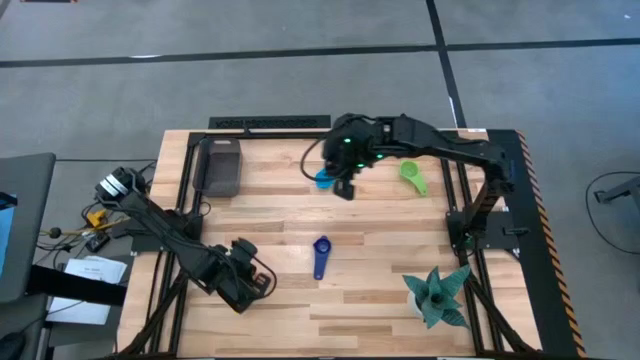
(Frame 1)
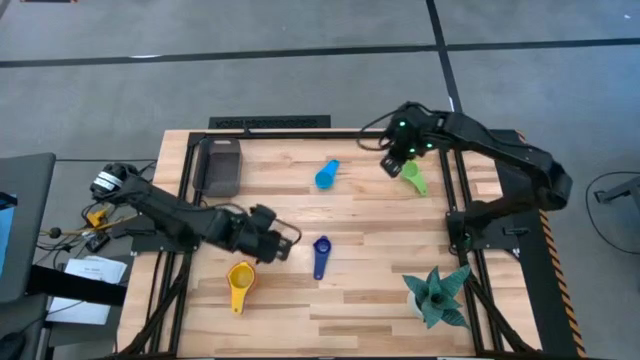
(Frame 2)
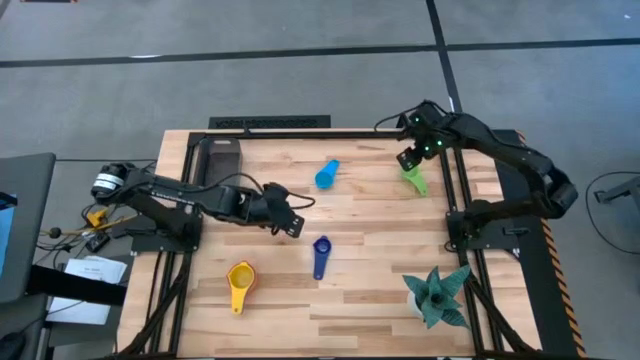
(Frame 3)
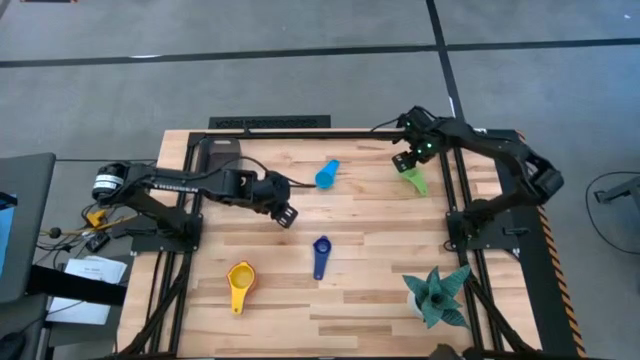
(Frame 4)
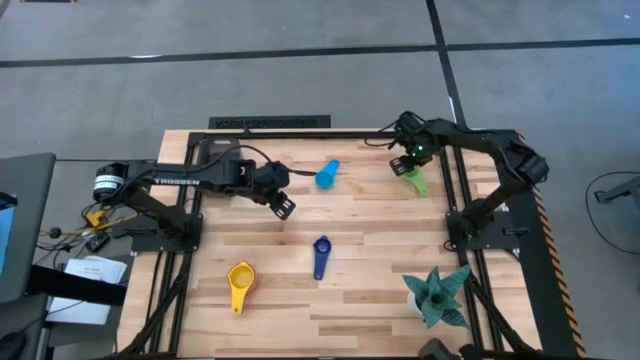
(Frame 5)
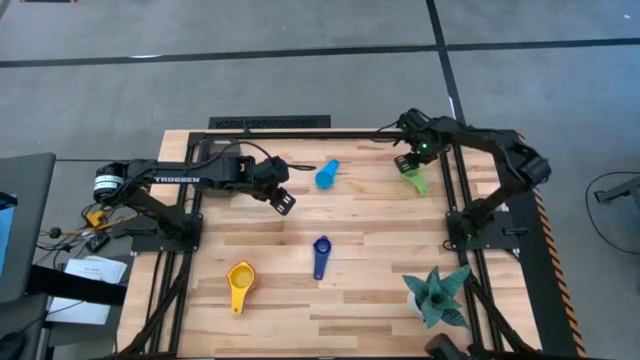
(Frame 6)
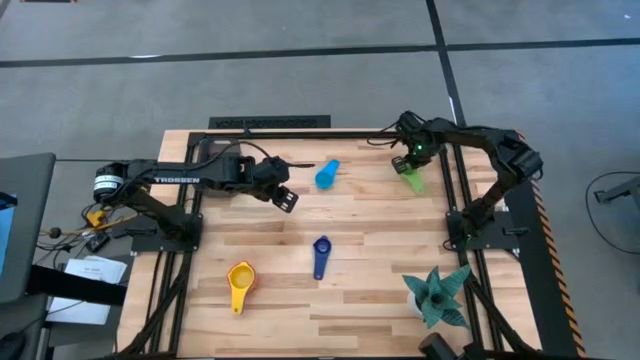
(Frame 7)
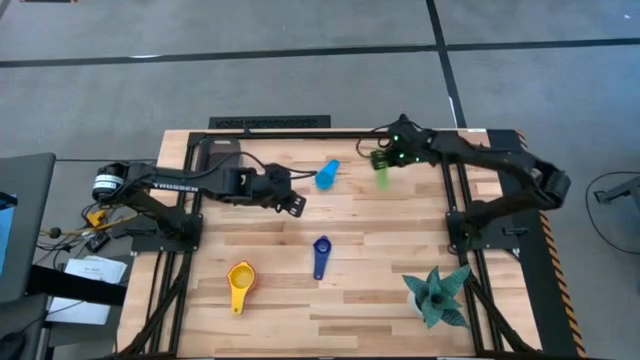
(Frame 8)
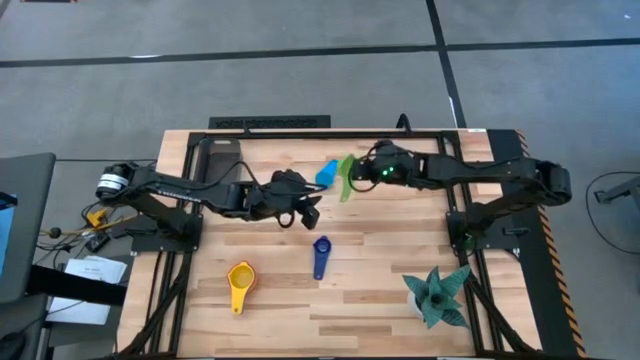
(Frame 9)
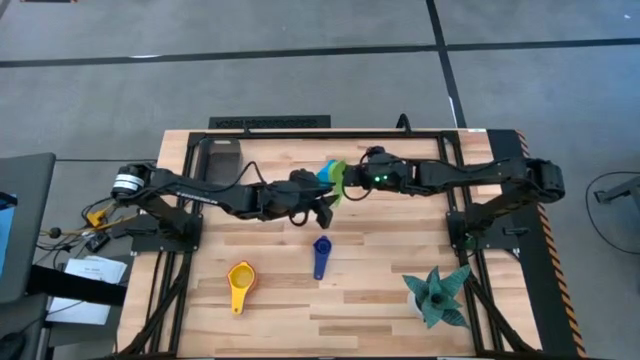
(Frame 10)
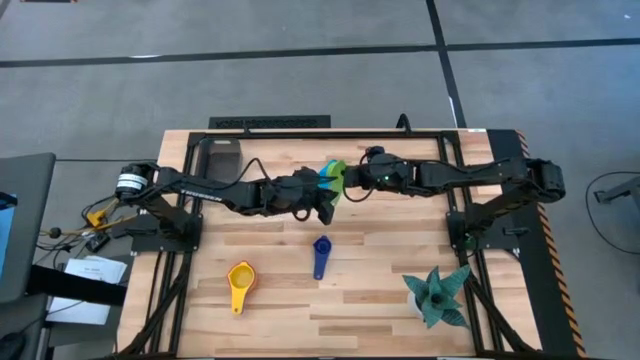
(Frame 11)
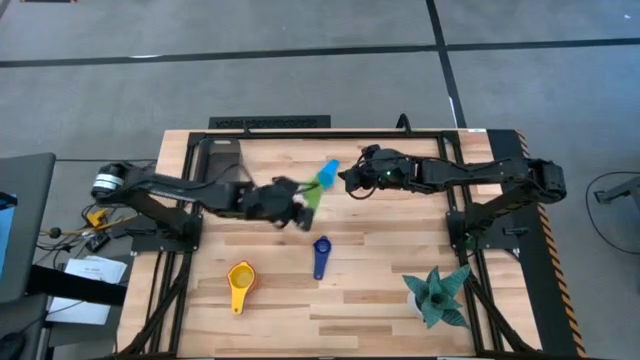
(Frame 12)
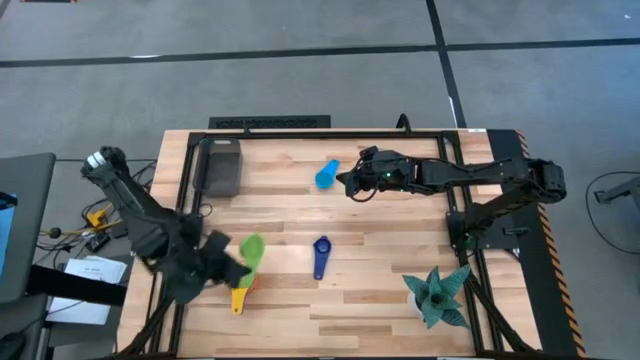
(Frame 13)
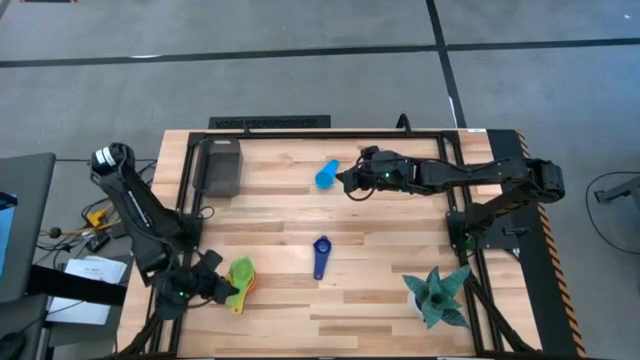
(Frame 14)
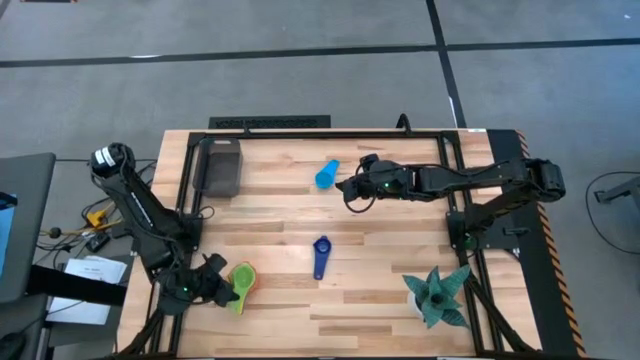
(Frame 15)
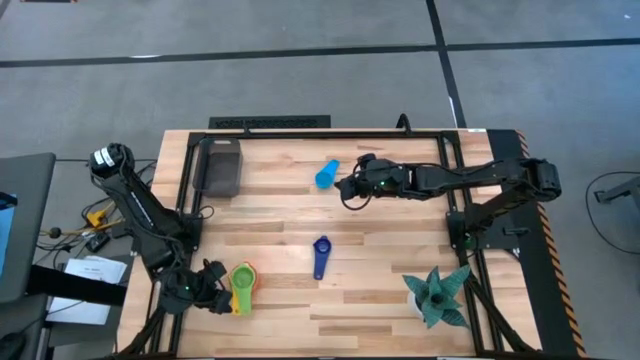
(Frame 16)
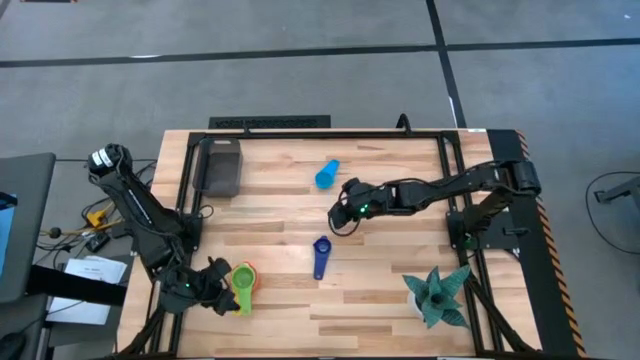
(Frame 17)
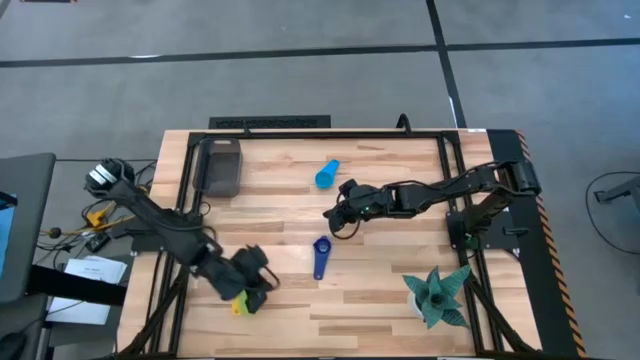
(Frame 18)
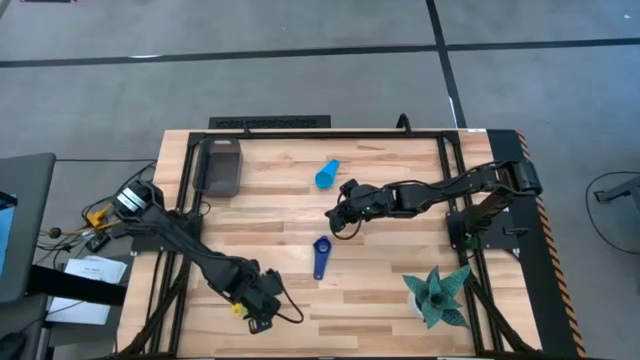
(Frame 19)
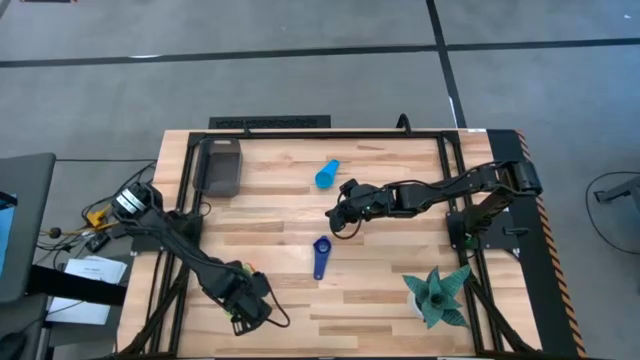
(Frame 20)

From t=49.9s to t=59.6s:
Task: Nest measuring cups in basket
Stack the light green measuring cup on top of the yellow measuring cup

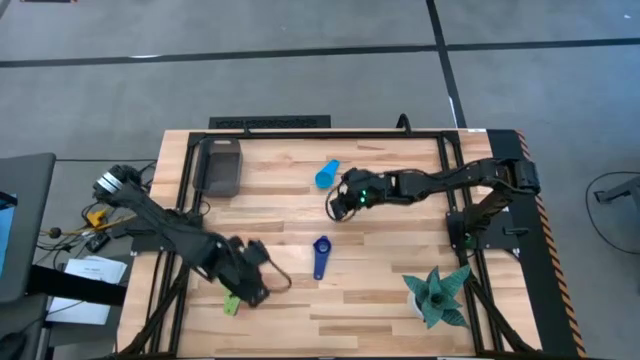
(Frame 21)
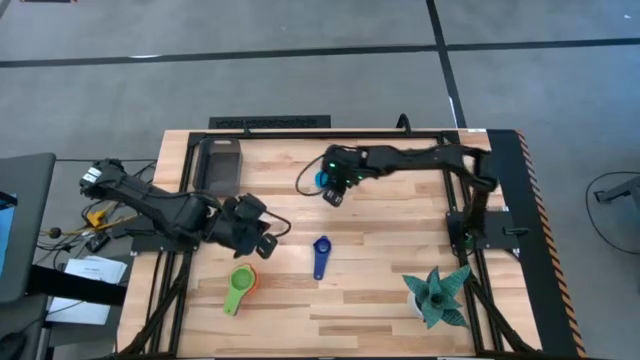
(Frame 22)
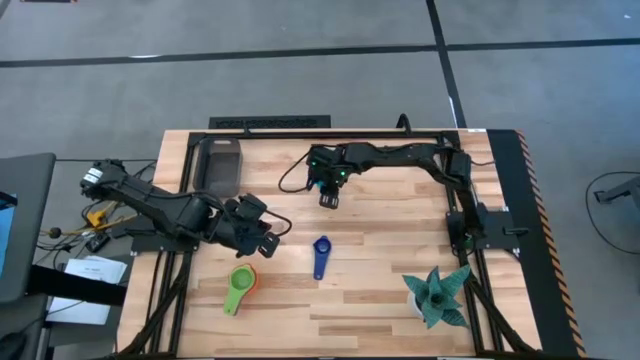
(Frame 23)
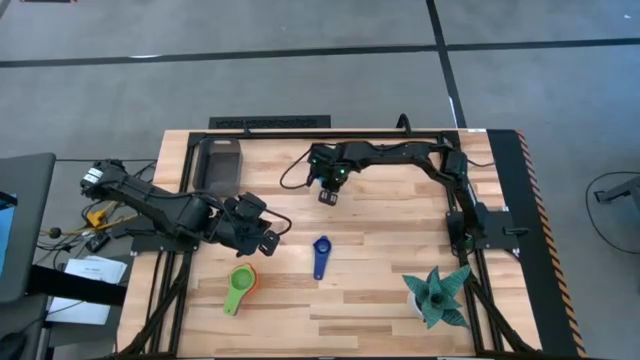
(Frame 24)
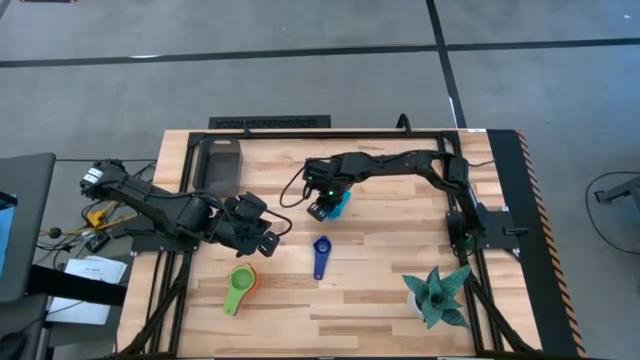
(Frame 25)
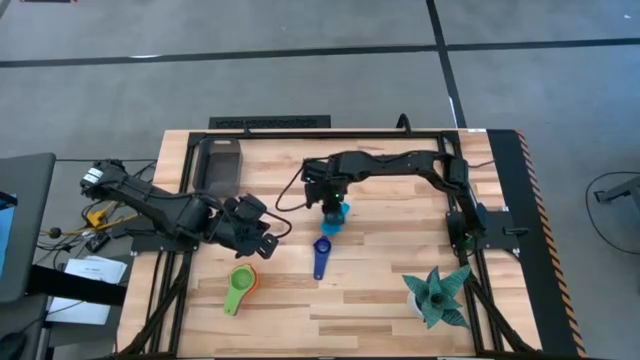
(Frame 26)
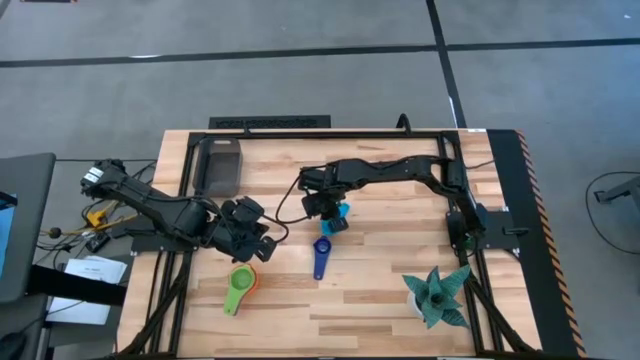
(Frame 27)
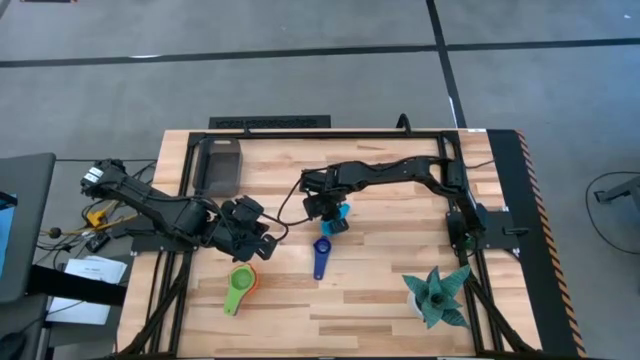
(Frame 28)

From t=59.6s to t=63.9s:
Stack the light blue measuring cup on top of the light green measuring cup

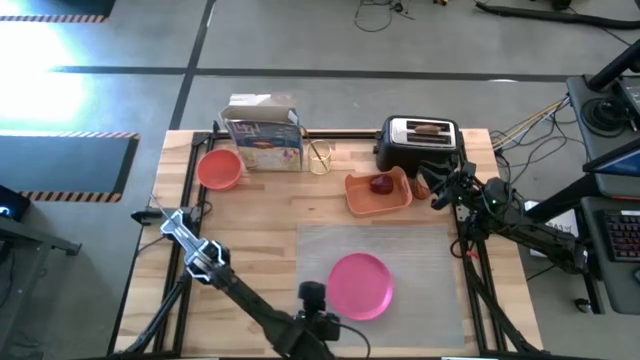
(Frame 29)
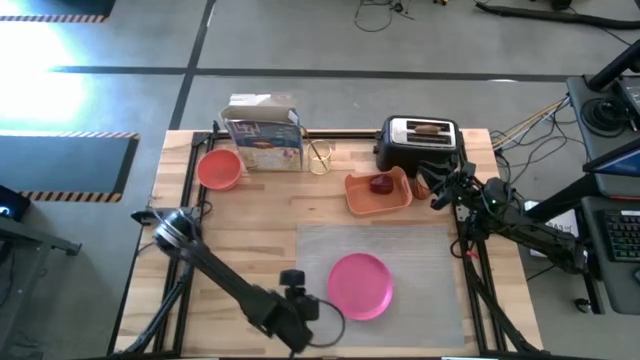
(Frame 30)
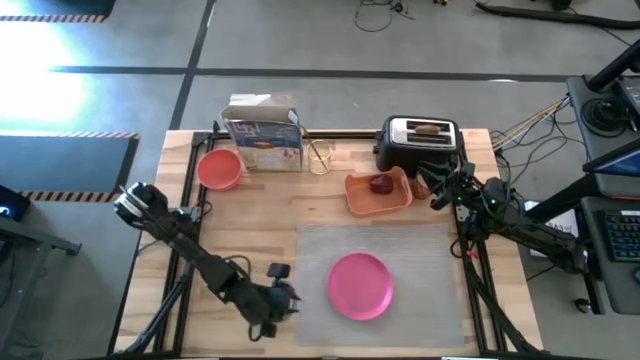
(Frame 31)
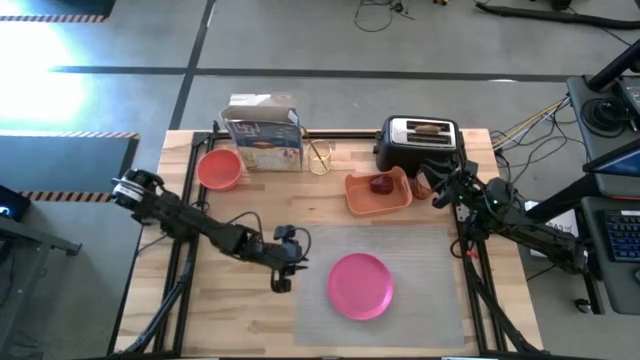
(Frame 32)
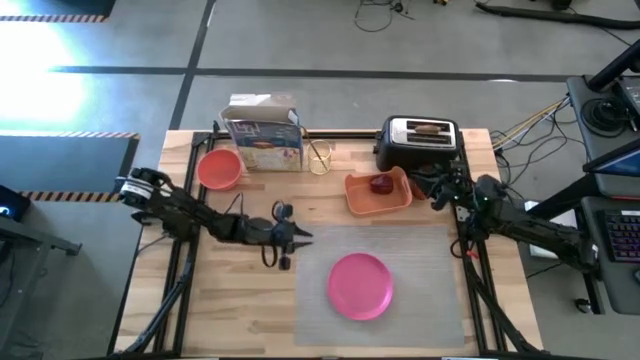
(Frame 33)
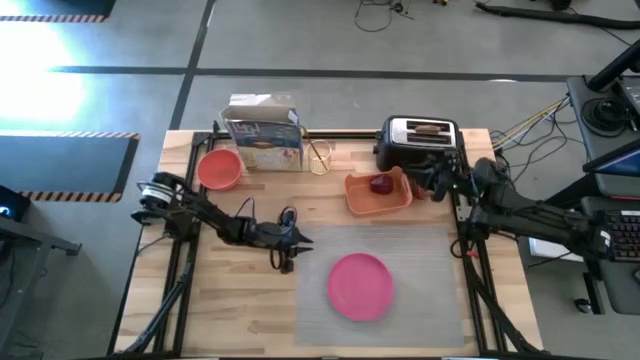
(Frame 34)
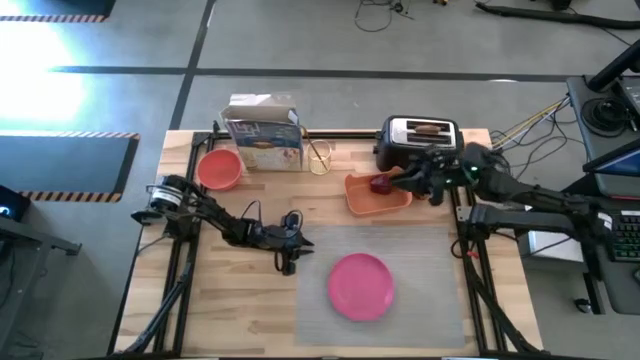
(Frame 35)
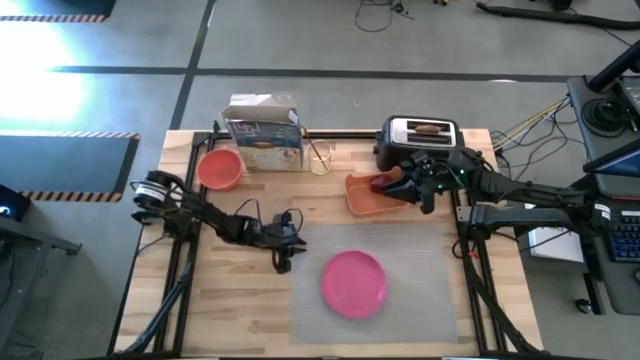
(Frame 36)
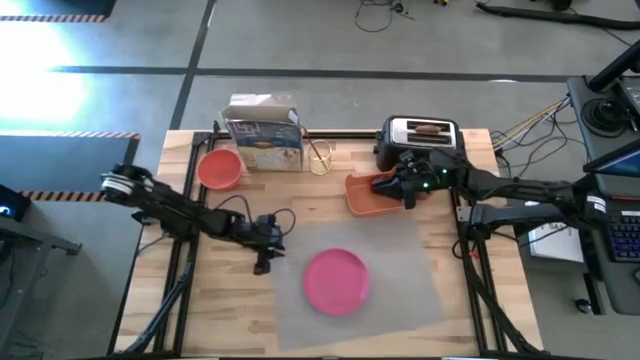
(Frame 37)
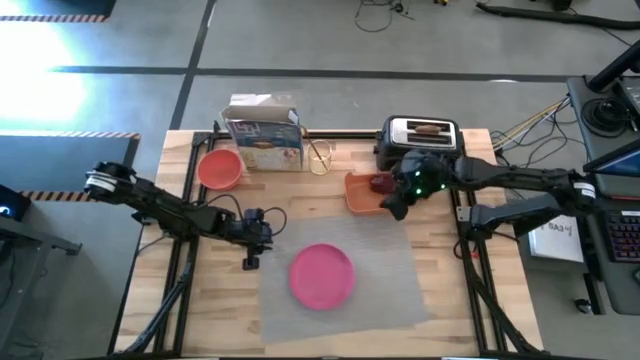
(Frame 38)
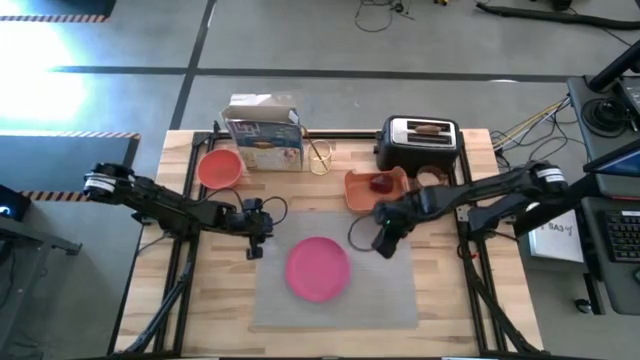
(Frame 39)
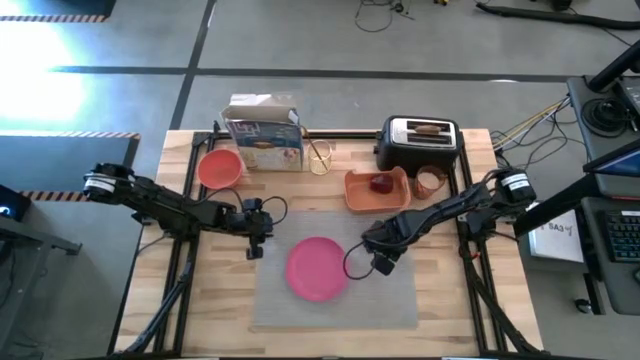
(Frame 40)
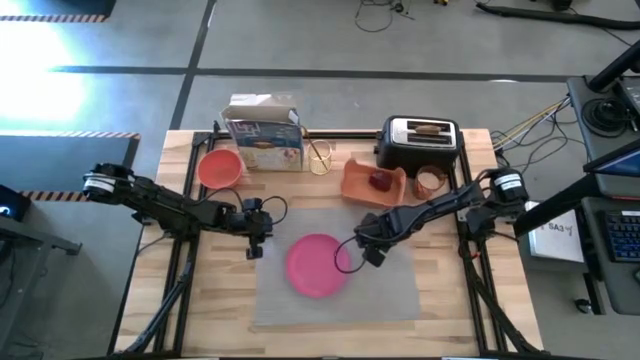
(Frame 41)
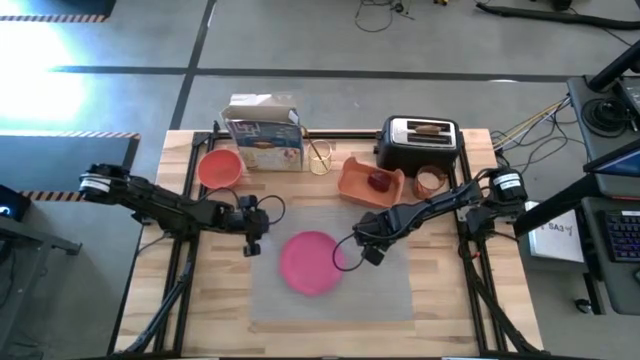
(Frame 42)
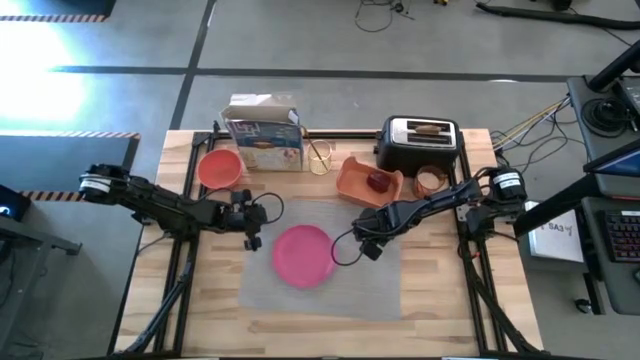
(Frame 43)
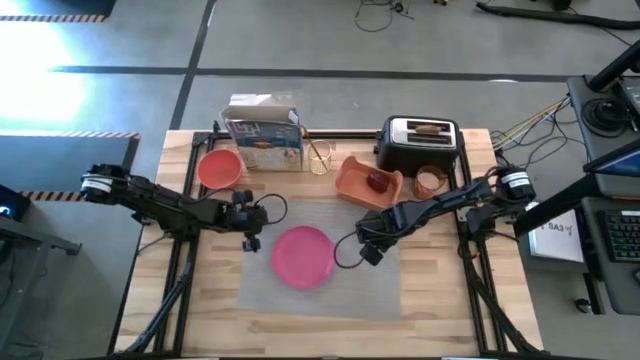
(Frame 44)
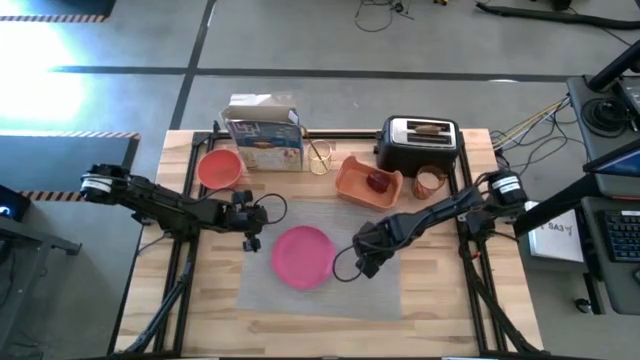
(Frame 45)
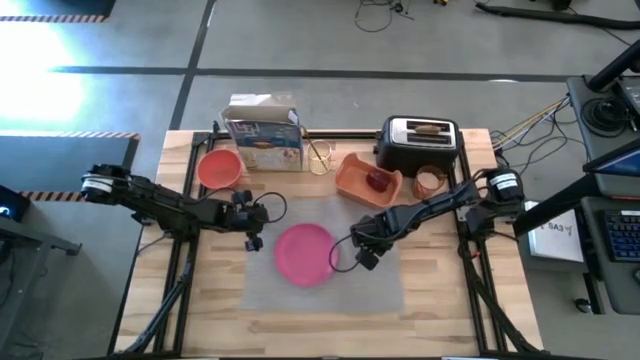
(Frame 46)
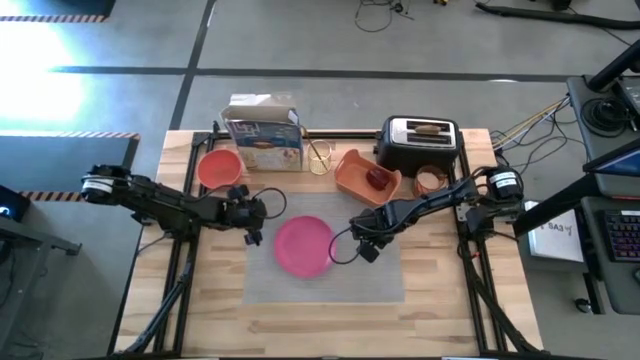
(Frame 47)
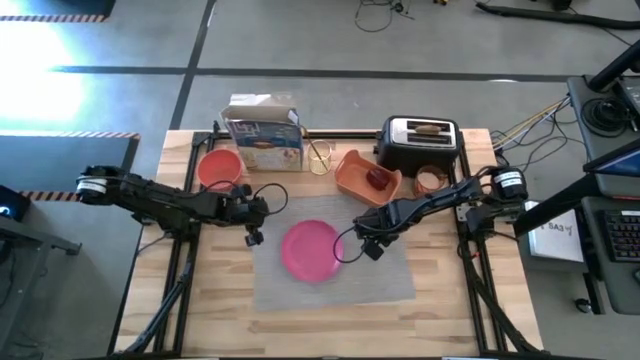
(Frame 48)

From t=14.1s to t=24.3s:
Task: Arrange a breakfast setting
Move the gray table mat to the center of the table
